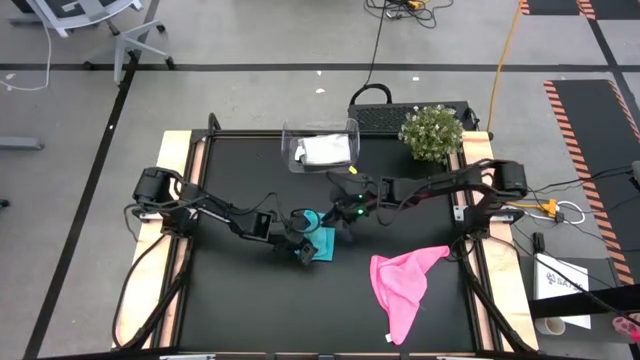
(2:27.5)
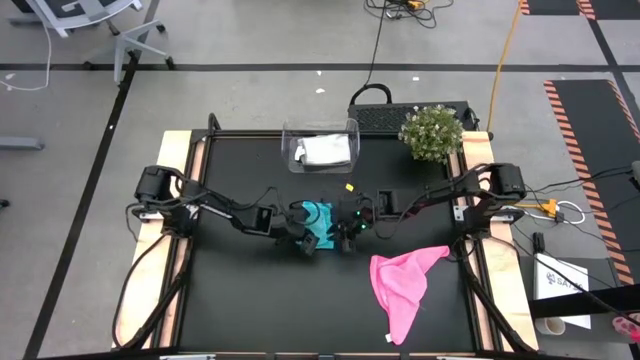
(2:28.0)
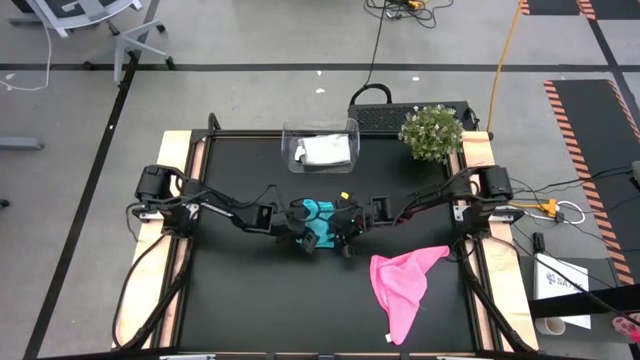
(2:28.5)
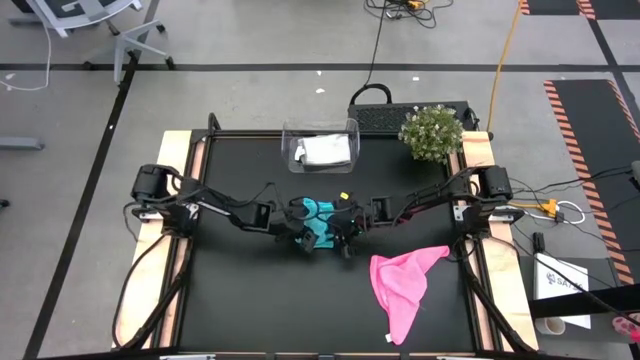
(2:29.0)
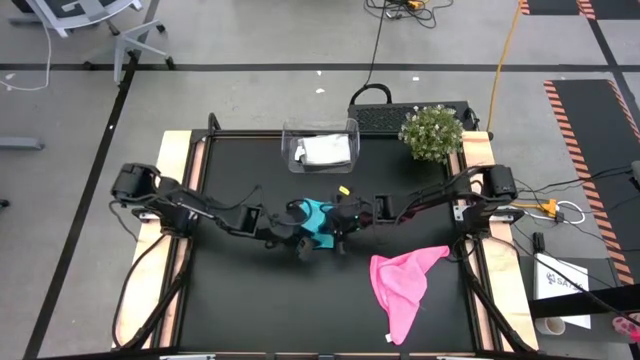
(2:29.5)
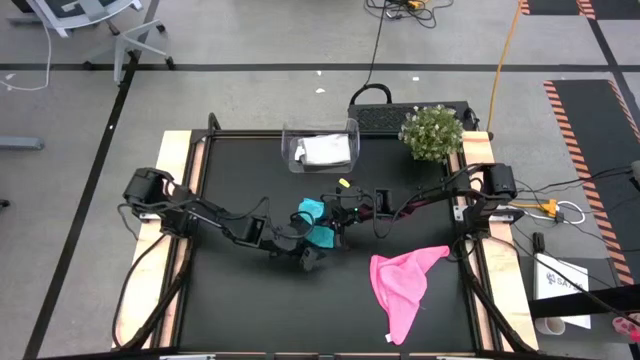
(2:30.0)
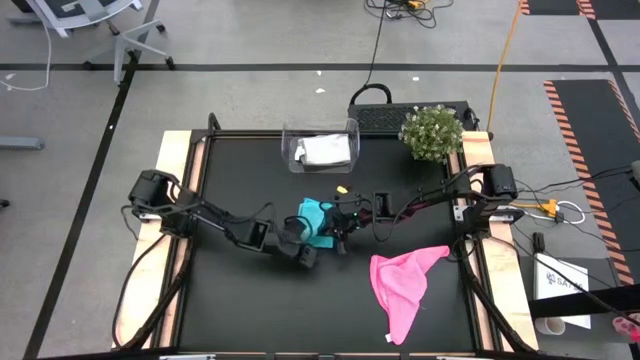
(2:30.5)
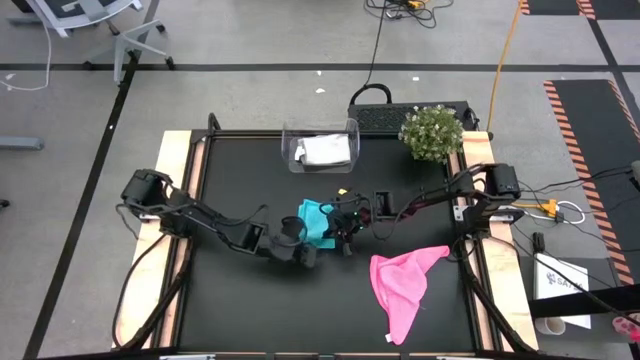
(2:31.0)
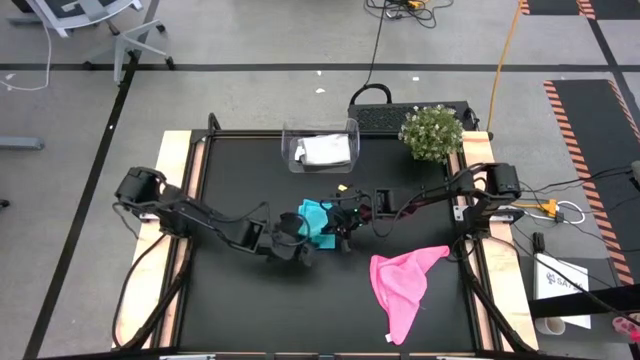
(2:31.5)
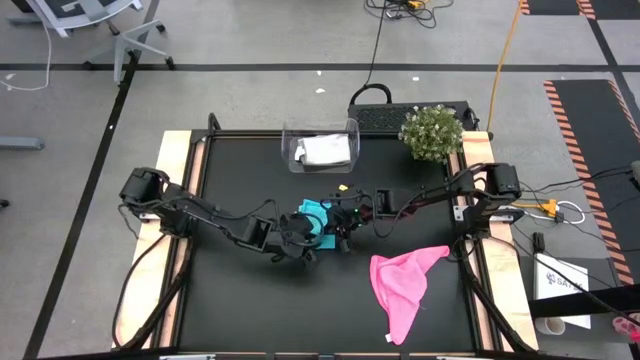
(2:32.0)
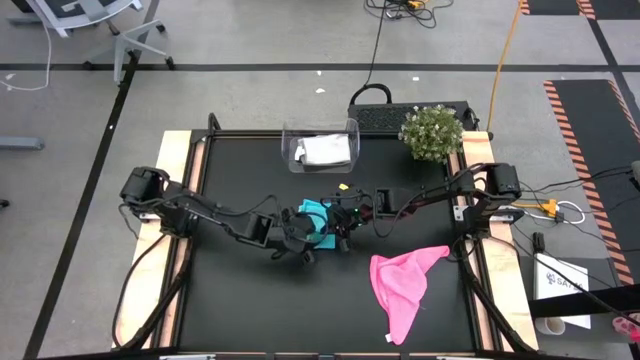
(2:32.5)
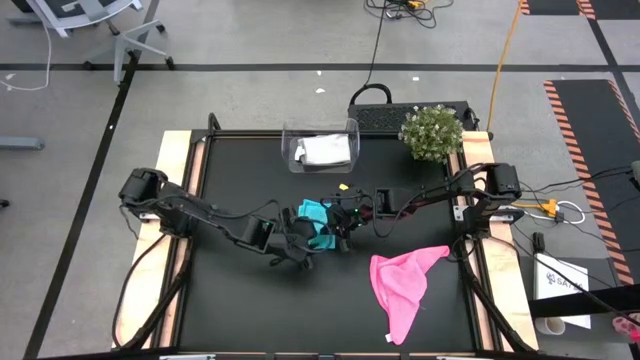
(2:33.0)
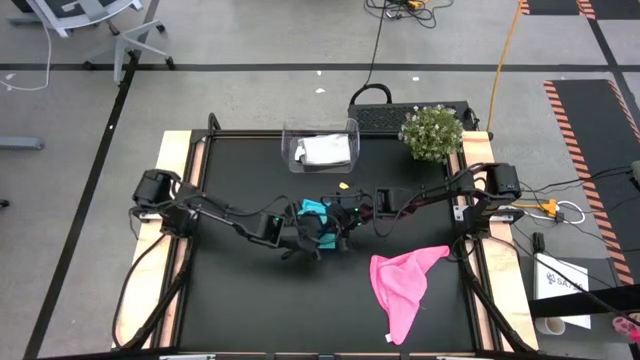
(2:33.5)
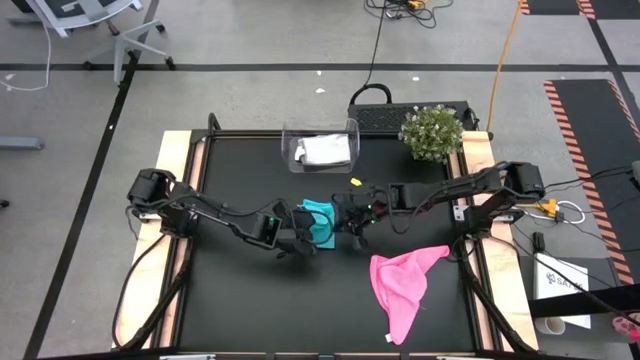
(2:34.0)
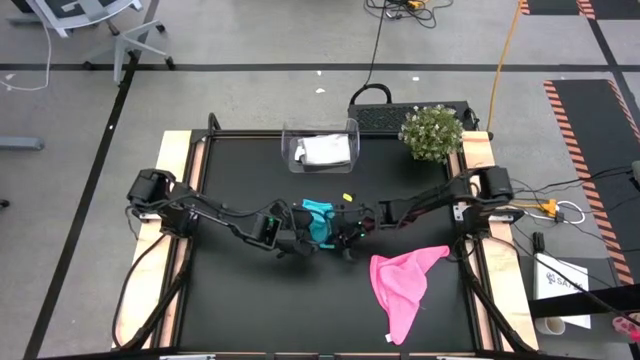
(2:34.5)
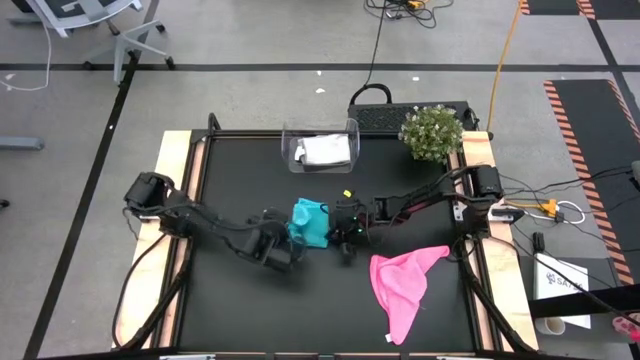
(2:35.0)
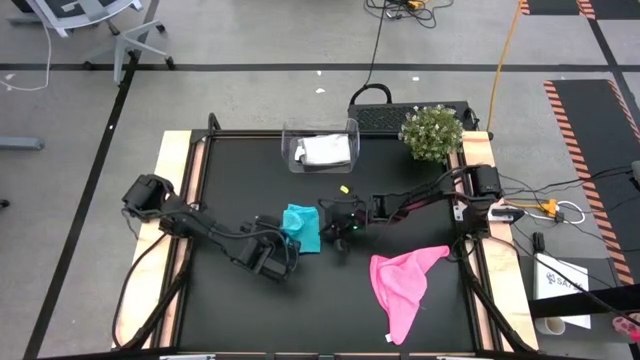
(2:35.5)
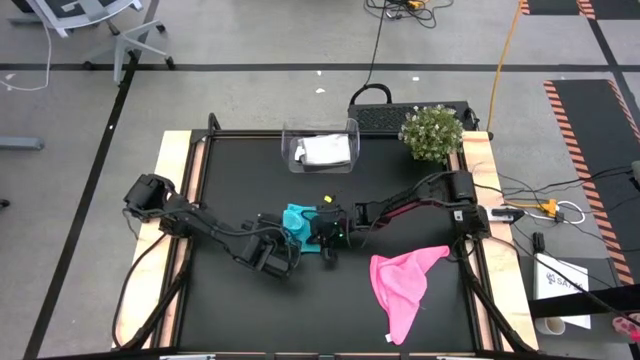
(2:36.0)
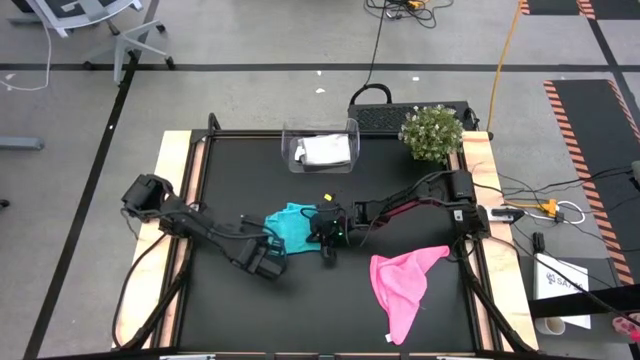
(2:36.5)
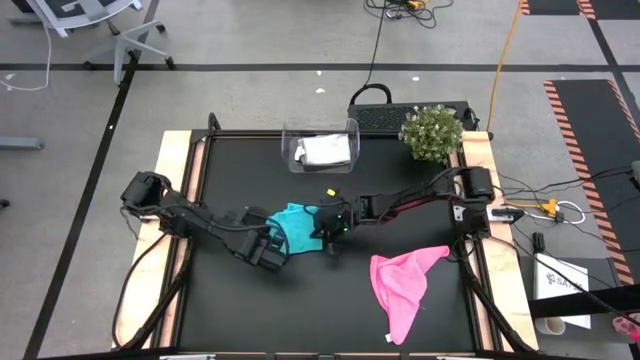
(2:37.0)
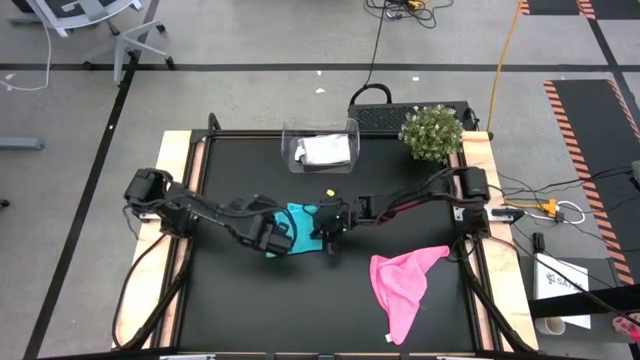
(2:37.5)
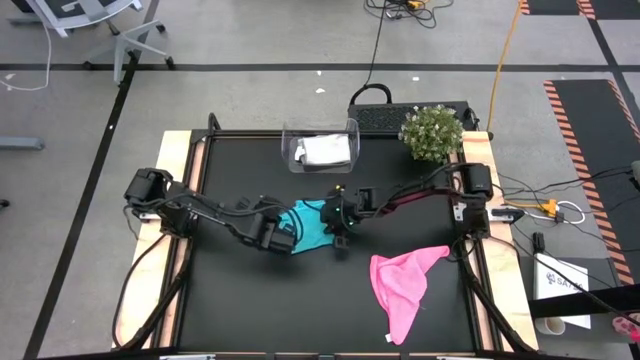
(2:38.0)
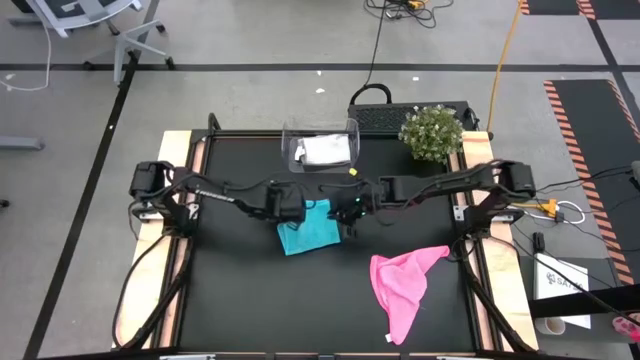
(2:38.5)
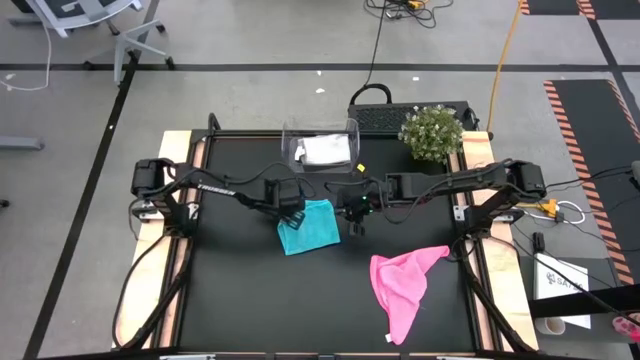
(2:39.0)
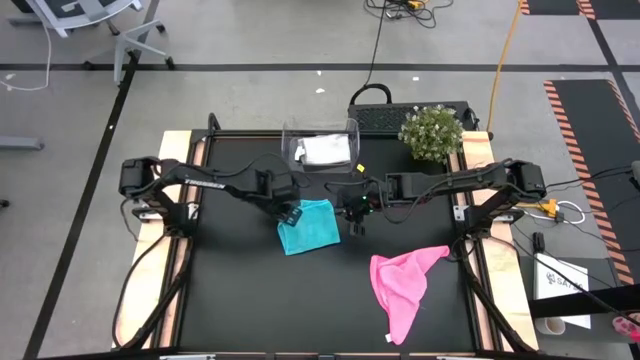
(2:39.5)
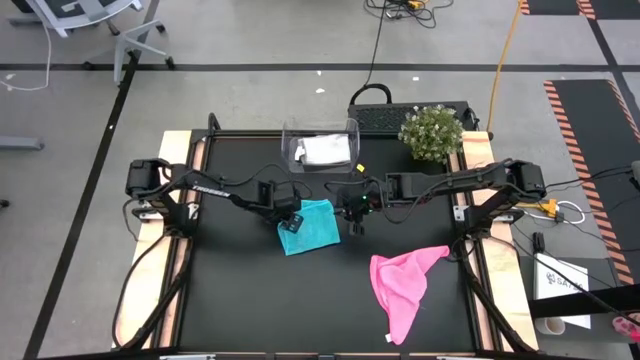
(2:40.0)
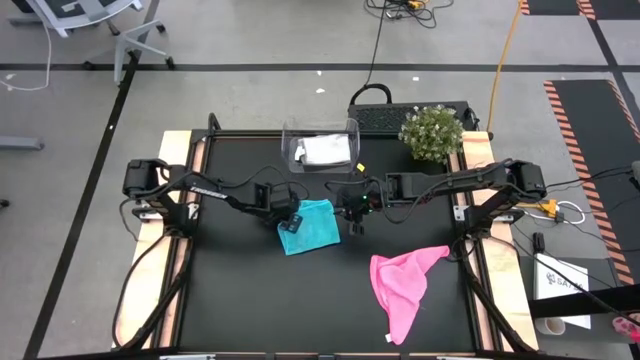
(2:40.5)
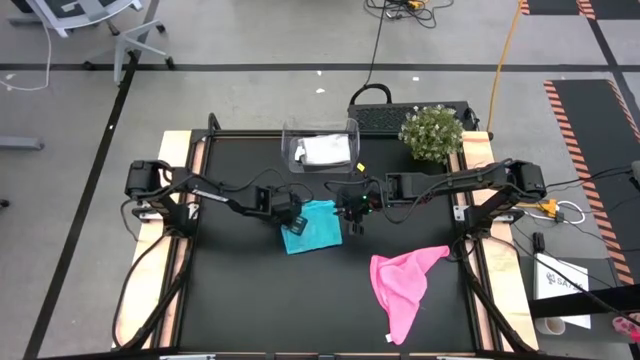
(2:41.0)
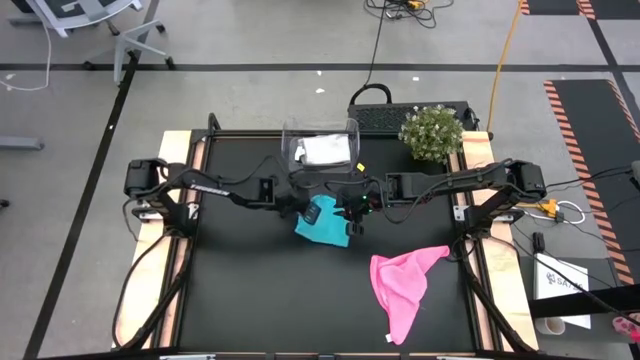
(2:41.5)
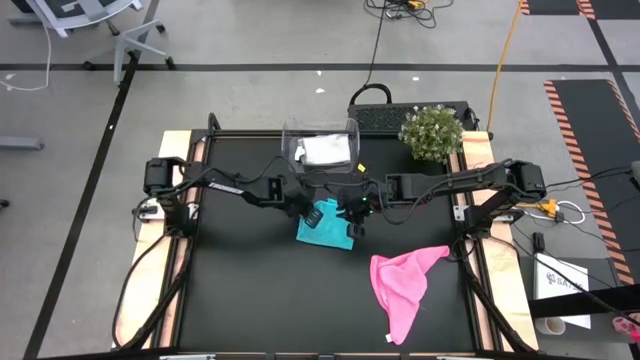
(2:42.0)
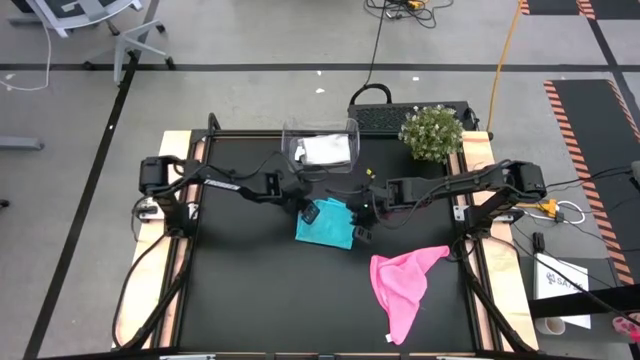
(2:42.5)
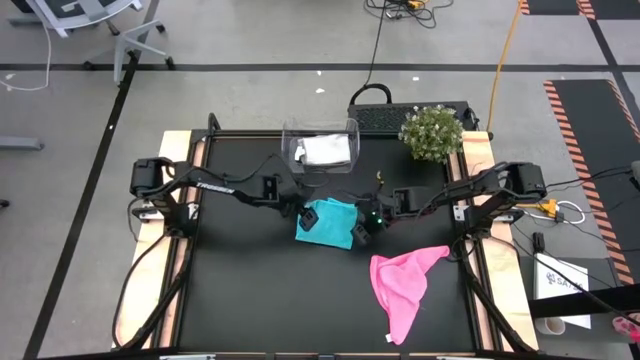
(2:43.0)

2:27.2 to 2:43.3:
Task: Fold microfiber towels
Fold the light blue microfiber cloth

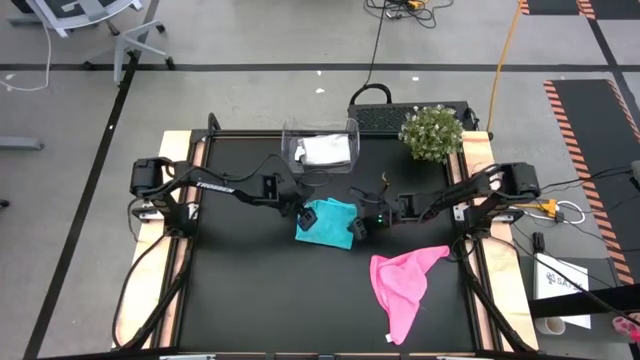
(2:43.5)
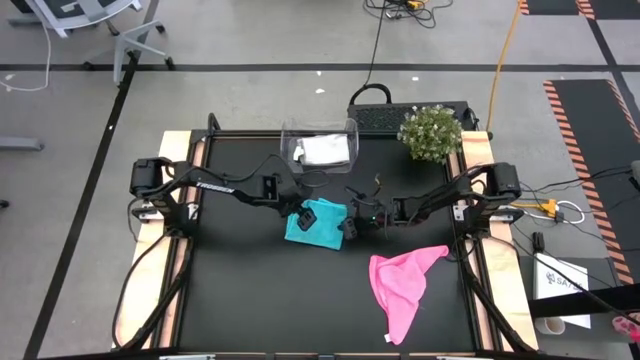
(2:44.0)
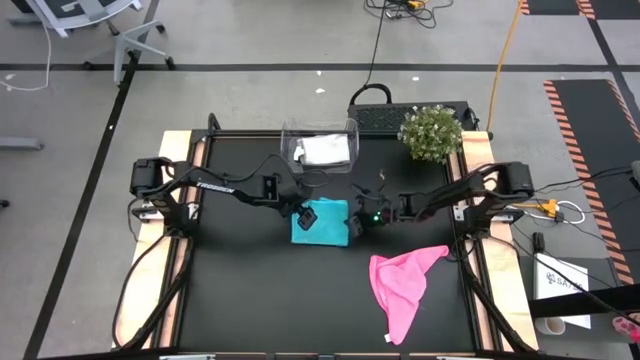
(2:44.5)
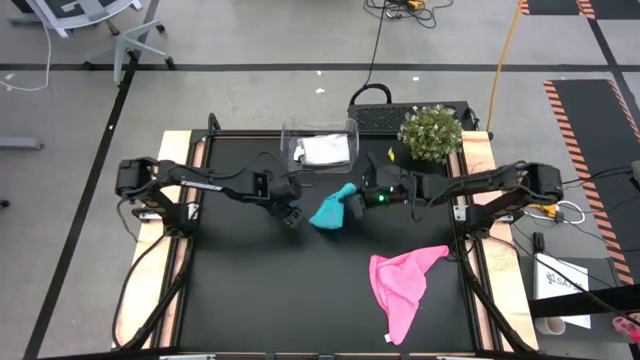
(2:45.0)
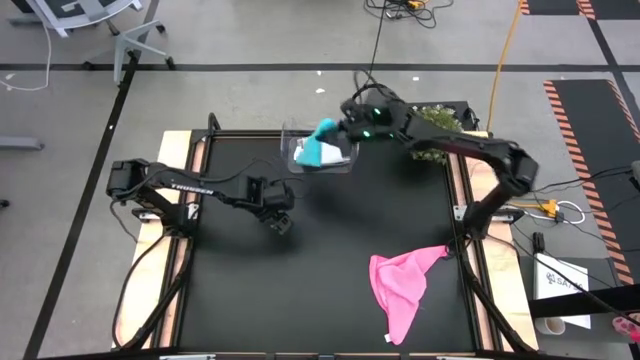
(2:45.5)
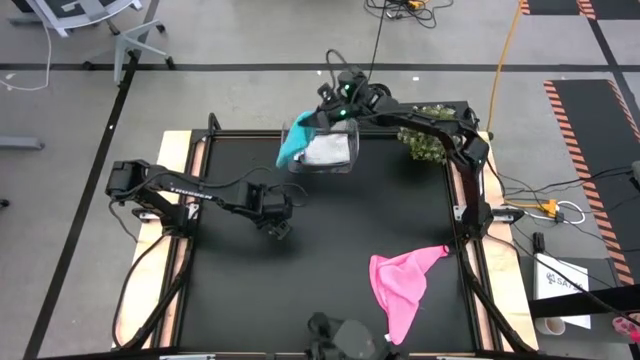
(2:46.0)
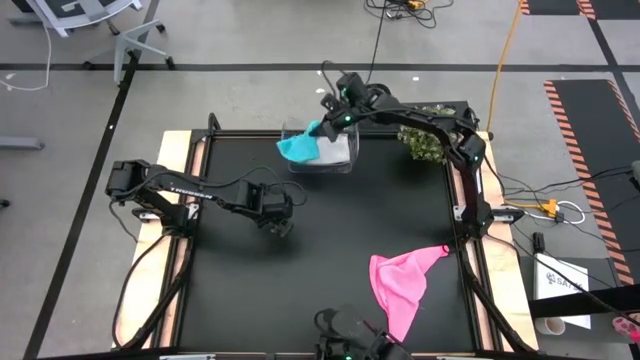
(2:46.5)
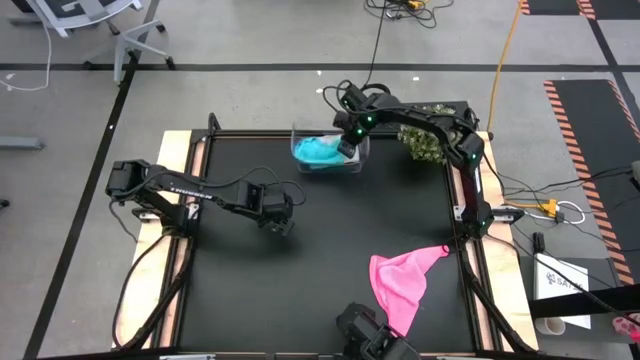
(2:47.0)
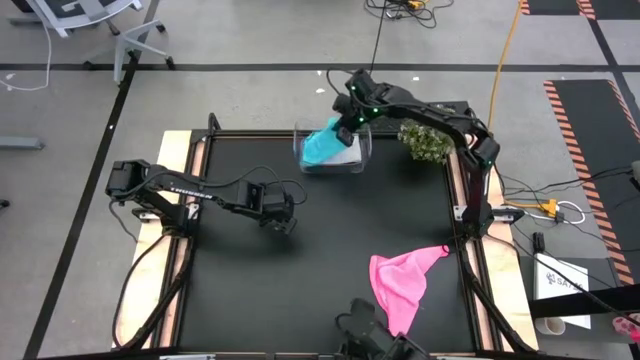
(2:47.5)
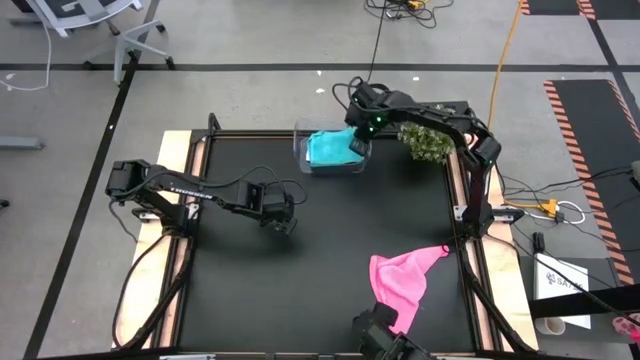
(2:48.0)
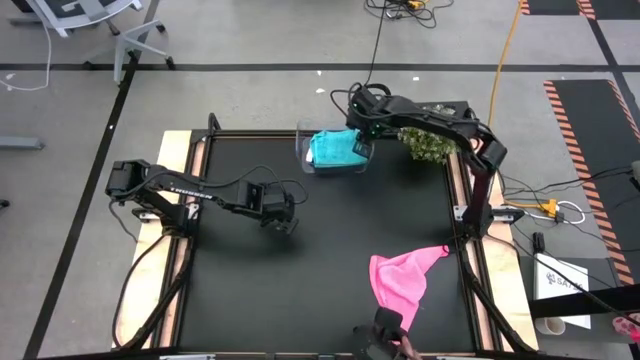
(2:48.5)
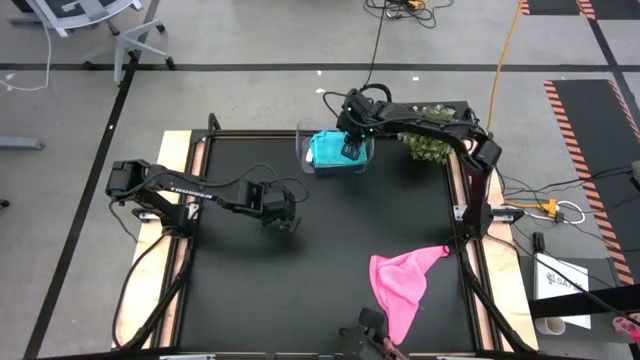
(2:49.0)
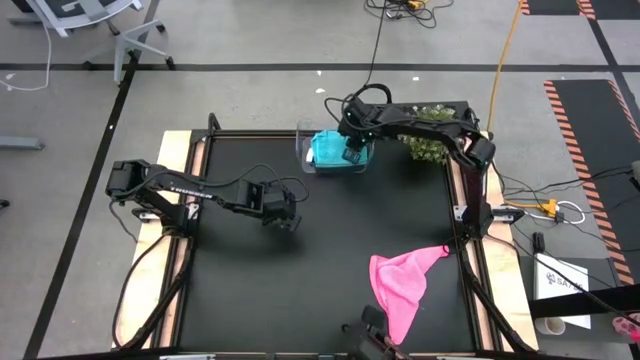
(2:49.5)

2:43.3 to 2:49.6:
Put the light blue microfiber cloth into the transparent bin
